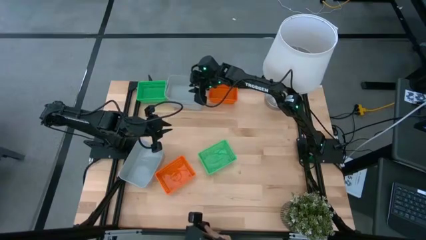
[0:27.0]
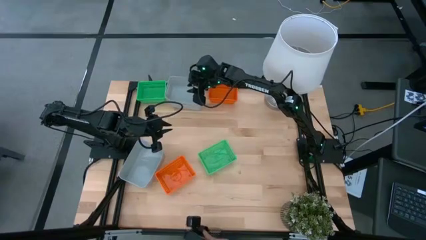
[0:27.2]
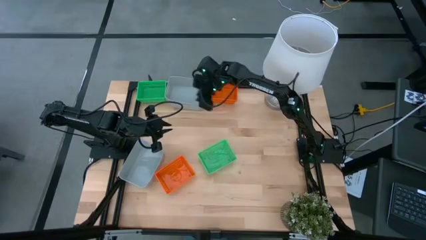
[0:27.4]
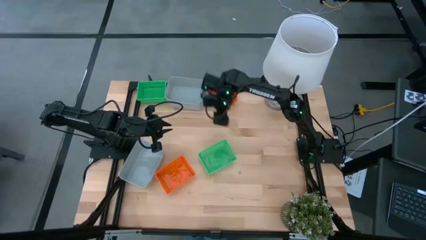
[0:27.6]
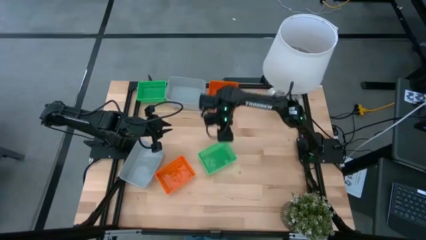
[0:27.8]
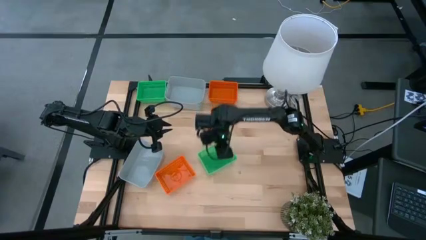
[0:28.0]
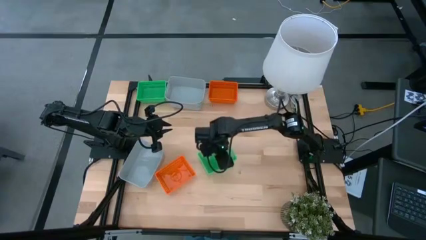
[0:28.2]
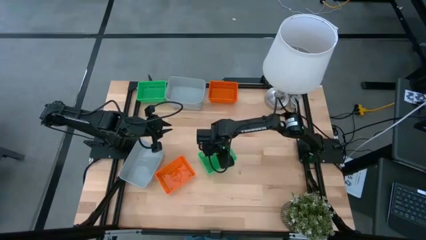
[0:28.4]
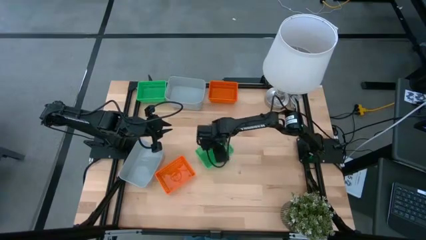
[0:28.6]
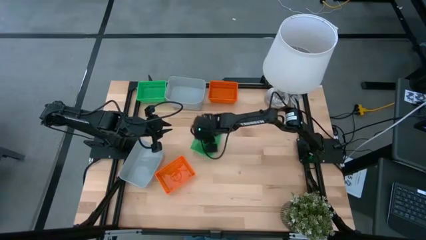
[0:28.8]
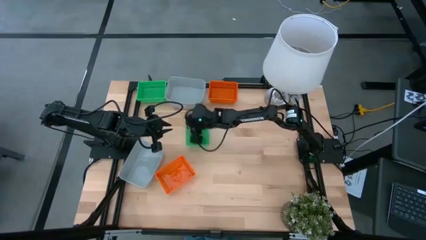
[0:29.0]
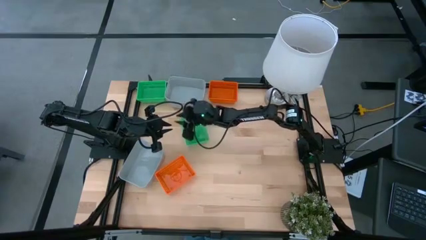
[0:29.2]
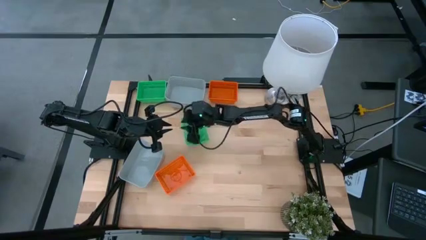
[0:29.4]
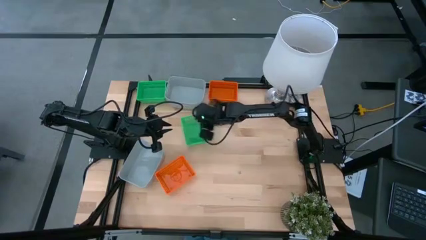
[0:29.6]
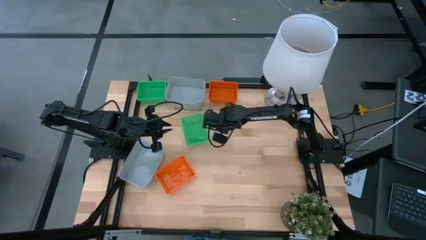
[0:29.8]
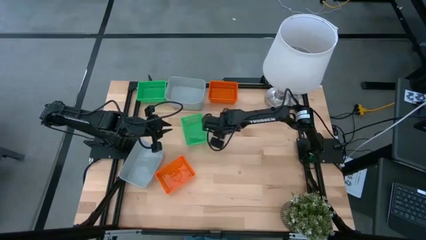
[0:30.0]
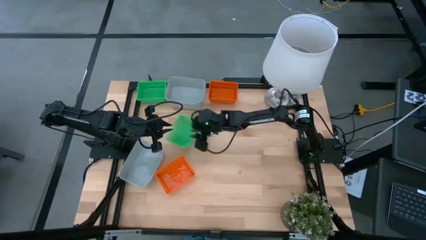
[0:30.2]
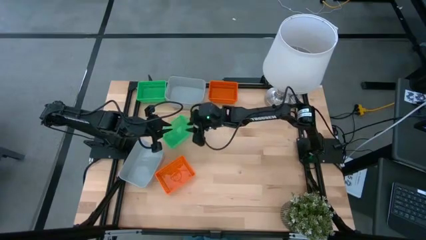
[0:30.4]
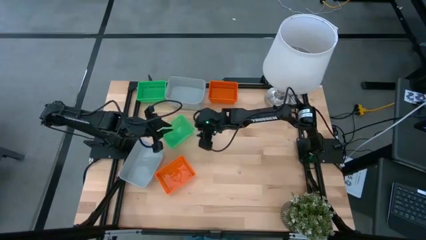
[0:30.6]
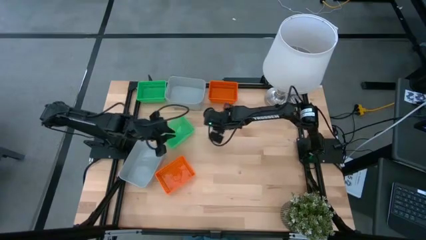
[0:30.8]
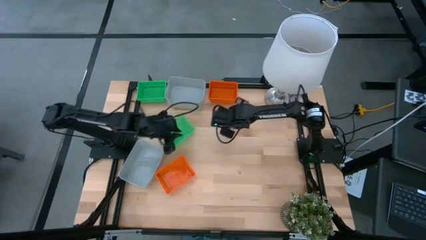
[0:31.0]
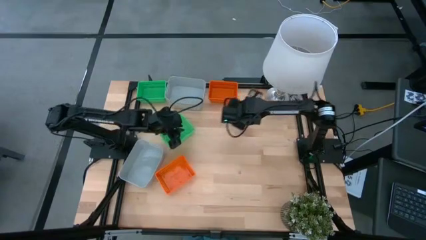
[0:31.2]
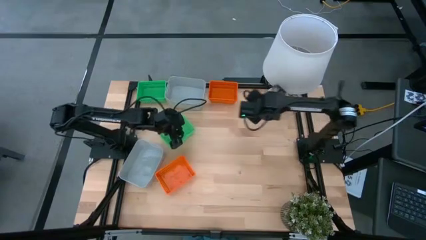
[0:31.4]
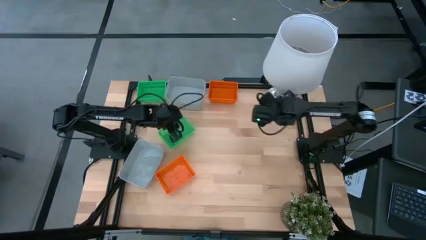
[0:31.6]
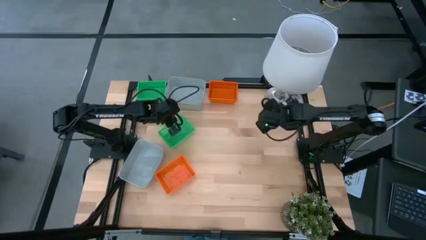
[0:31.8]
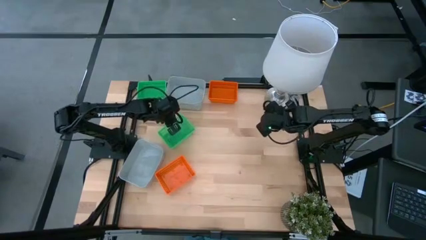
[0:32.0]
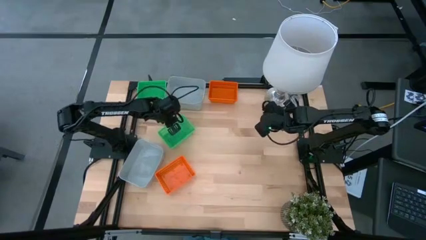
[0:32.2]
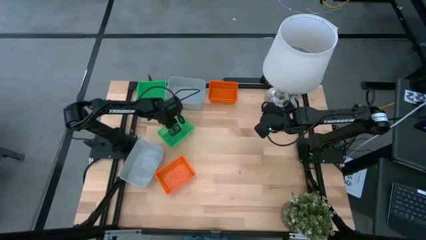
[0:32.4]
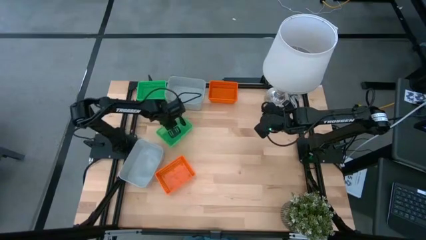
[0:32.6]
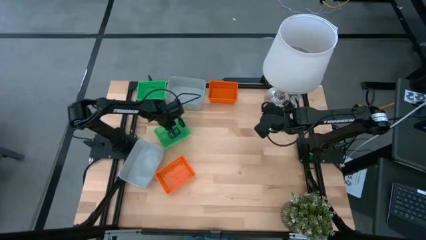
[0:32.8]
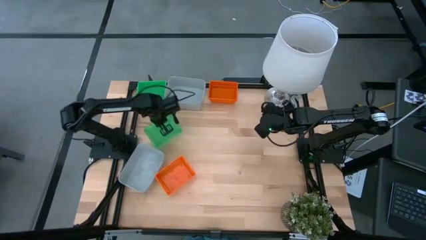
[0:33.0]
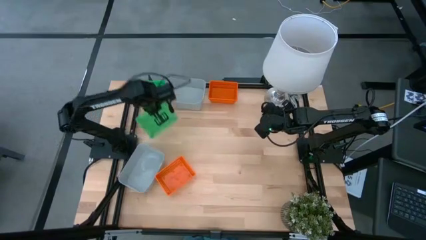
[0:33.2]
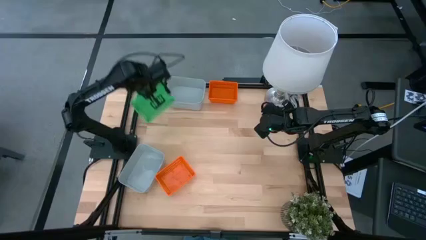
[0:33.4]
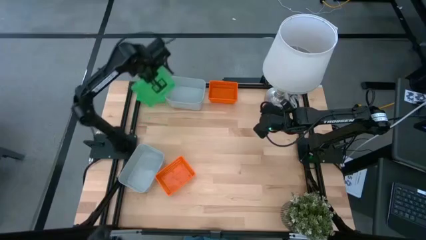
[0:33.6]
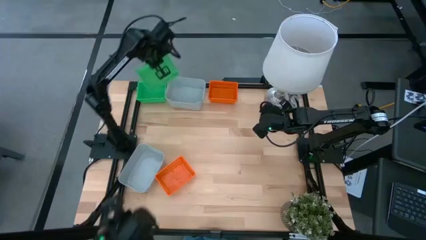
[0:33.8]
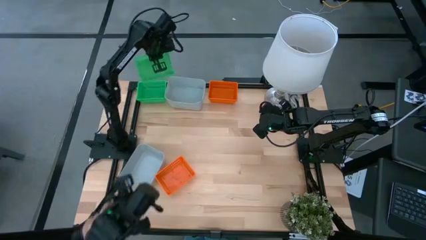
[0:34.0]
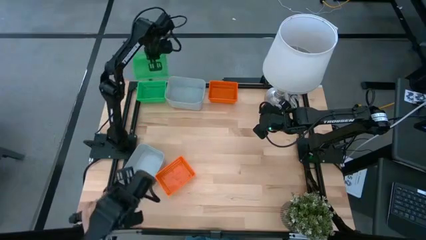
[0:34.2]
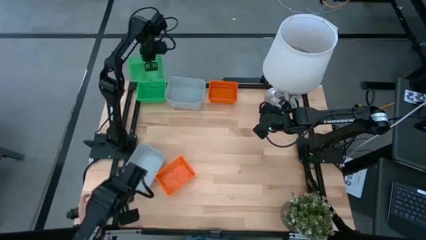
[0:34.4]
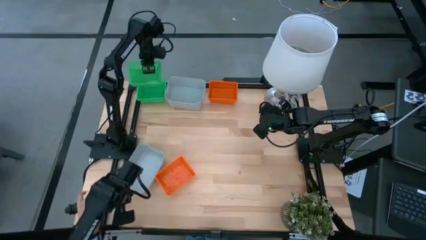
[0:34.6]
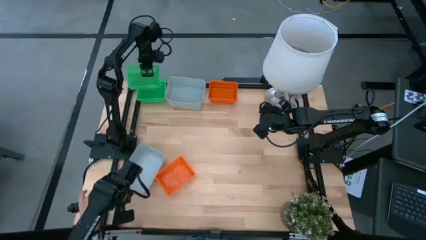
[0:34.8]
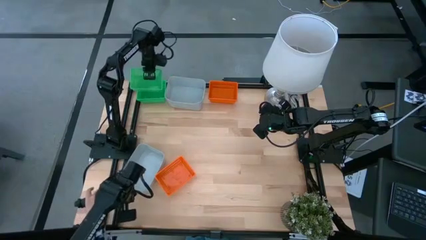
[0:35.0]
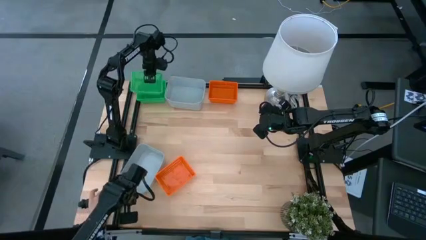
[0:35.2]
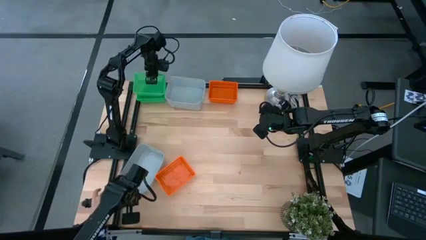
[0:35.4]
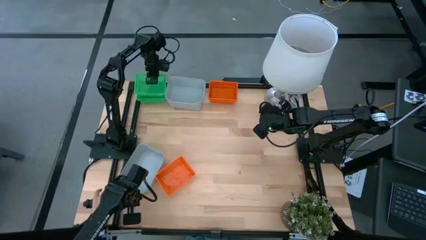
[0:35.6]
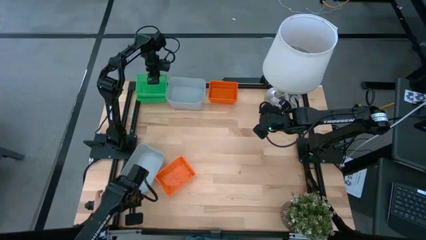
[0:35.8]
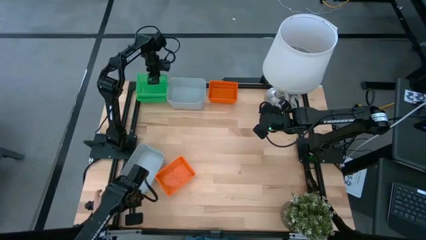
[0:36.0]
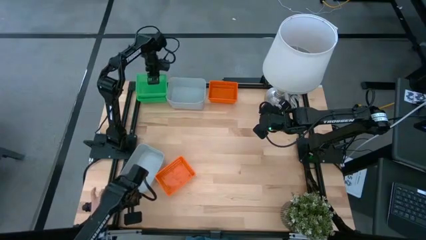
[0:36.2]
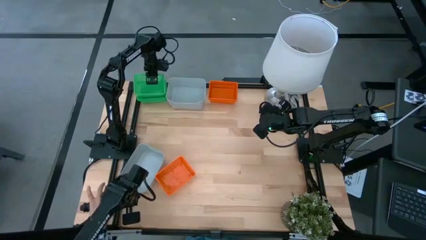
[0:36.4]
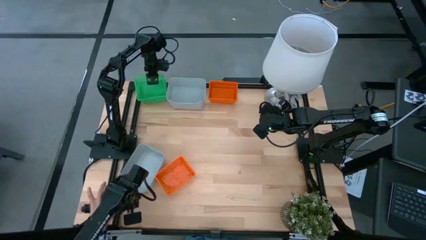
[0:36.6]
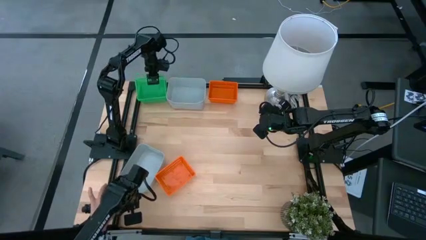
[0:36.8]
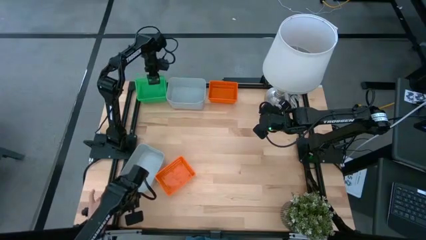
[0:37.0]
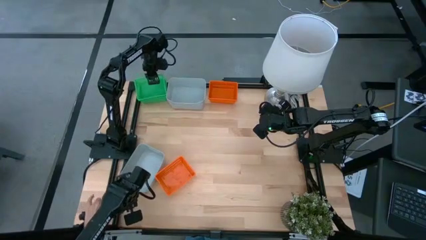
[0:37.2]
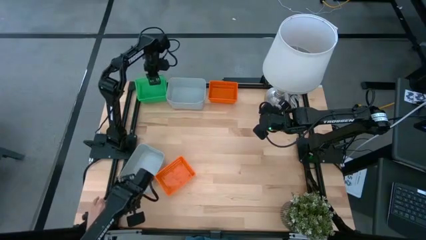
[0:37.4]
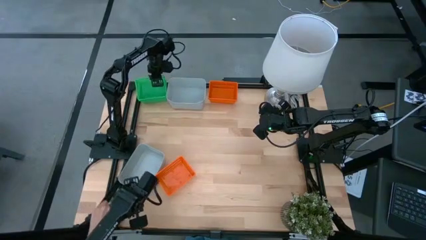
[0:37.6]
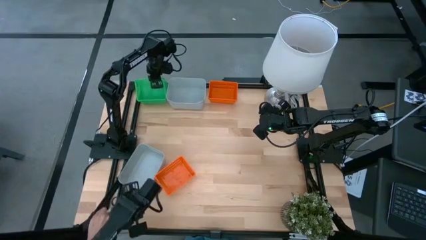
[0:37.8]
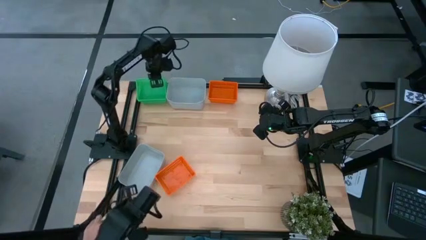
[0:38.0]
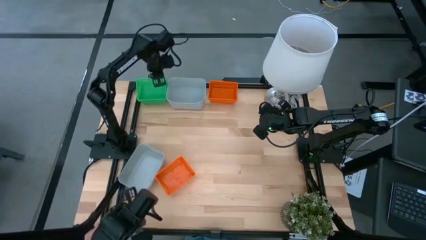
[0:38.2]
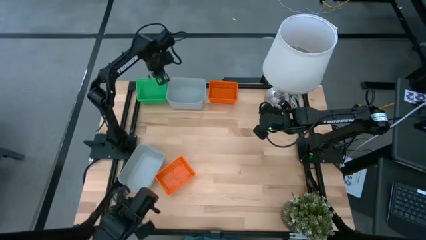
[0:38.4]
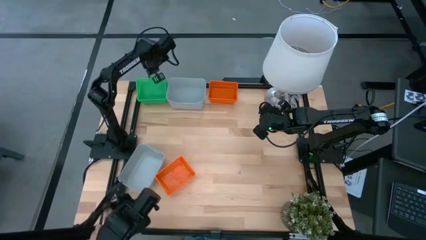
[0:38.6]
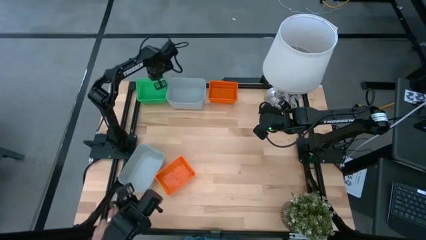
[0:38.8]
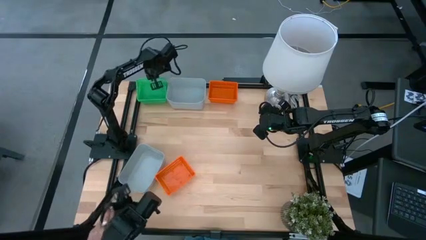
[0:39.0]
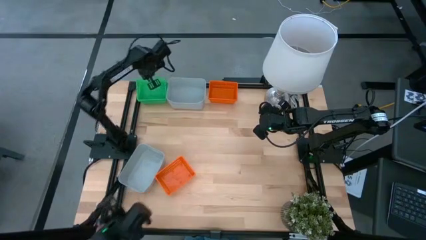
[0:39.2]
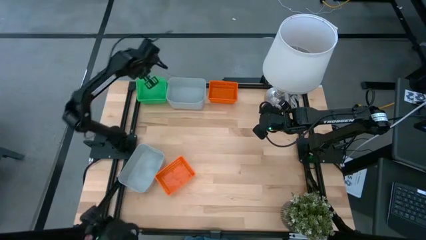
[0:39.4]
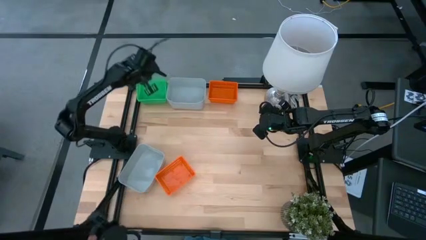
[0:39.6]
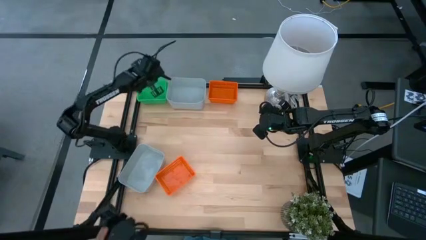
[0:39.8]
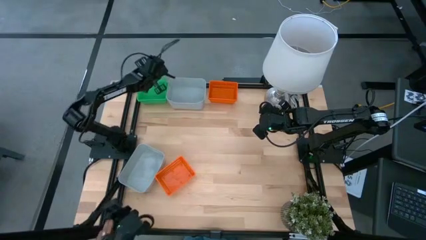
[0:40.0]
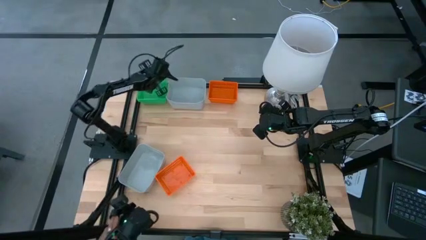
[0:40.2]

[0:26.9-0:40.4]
Stack the bottom green bin on top of the top green bin

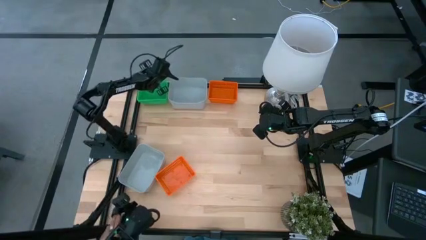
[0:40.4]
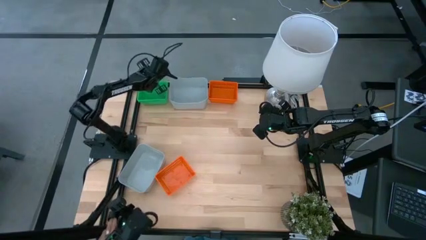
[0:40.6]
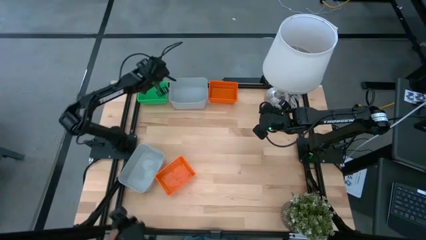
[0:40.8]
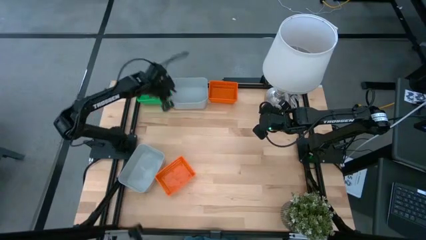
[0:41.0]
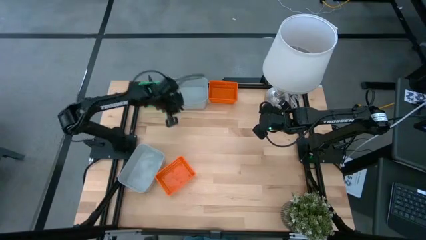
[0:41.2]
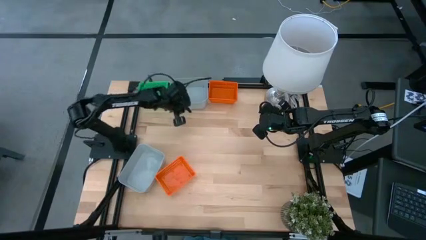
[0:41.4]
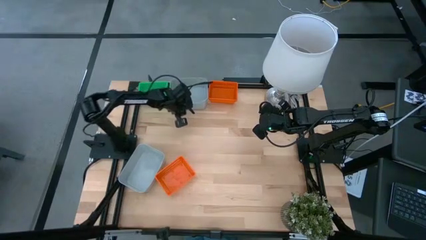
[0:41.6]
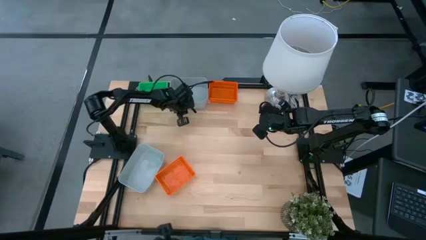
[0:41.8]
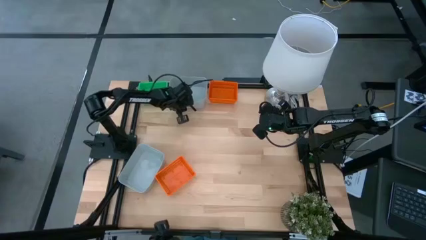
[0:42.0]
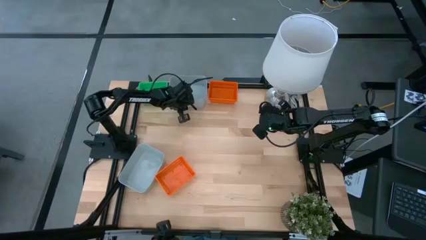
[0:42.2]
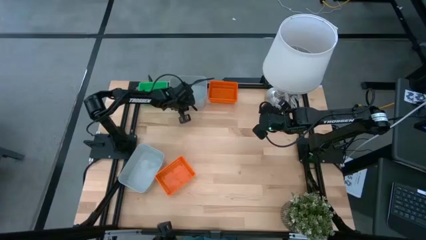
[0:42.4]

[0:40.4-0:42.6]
Adjust the stacked gray bins
